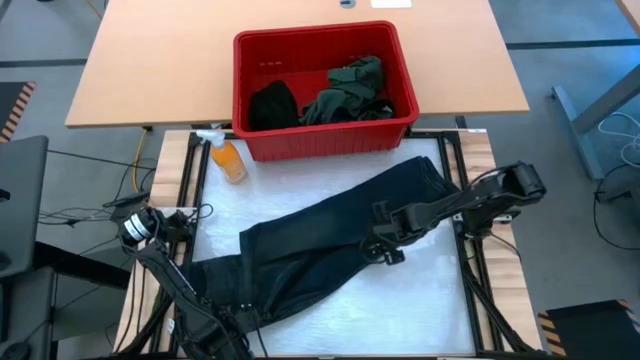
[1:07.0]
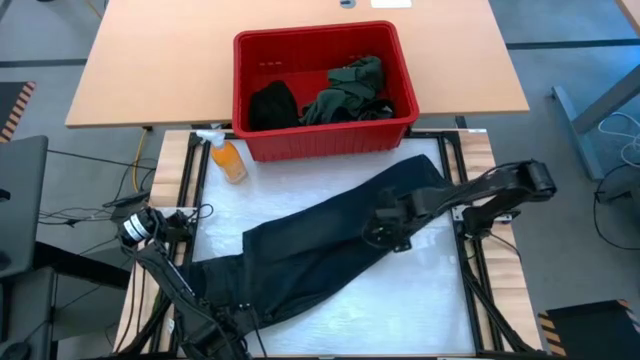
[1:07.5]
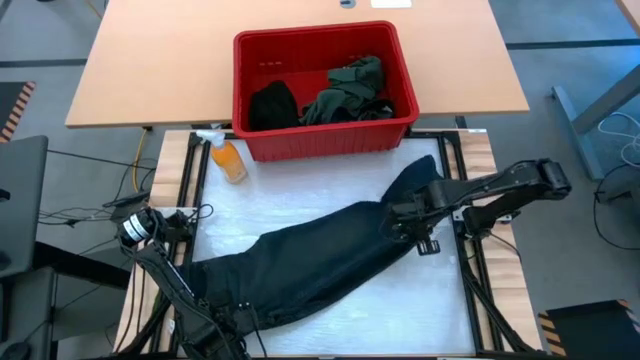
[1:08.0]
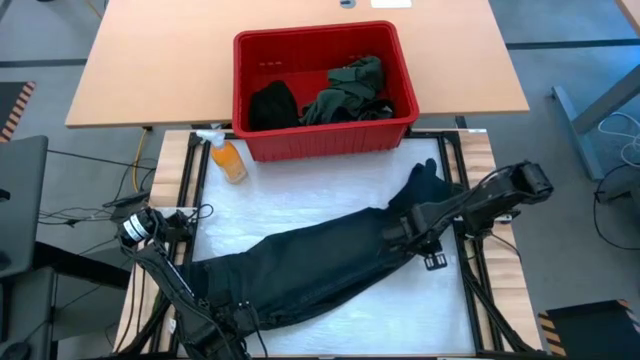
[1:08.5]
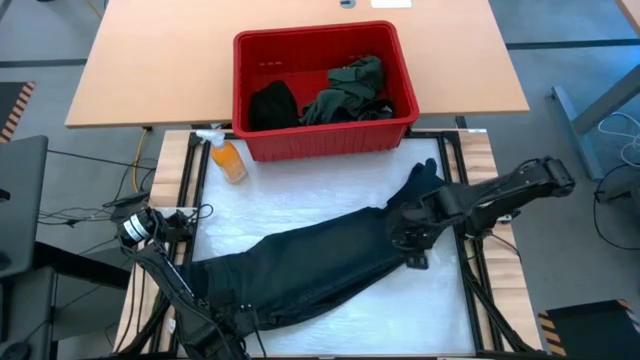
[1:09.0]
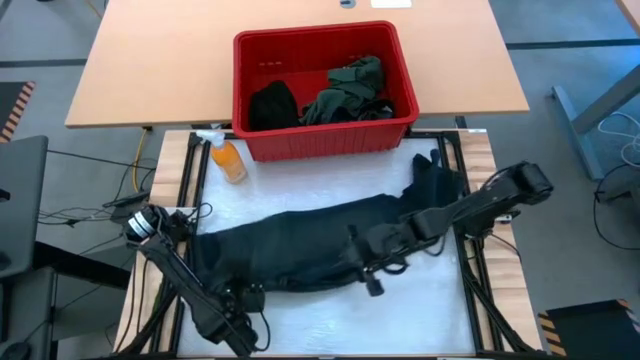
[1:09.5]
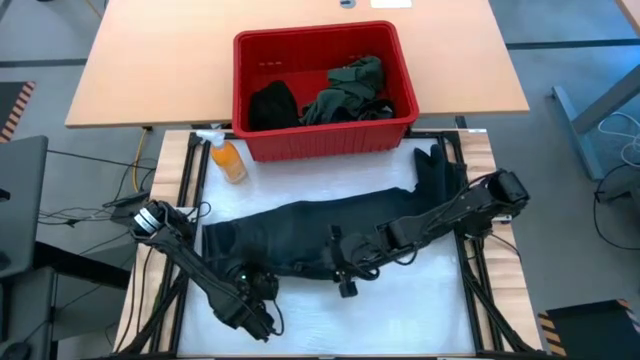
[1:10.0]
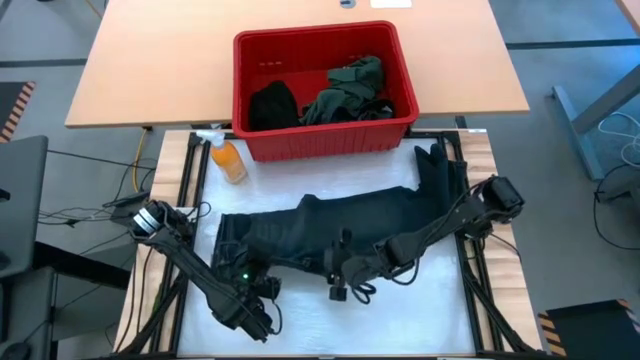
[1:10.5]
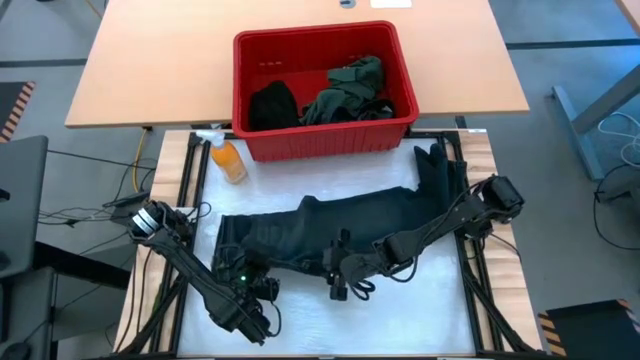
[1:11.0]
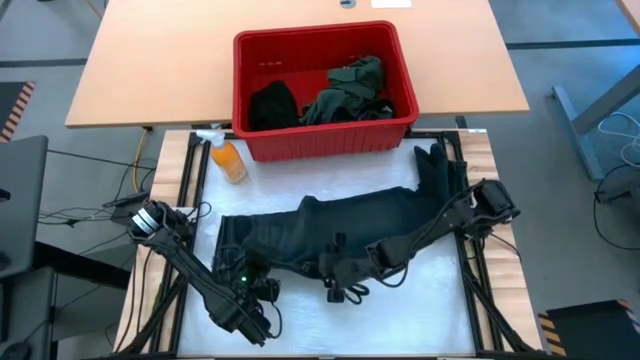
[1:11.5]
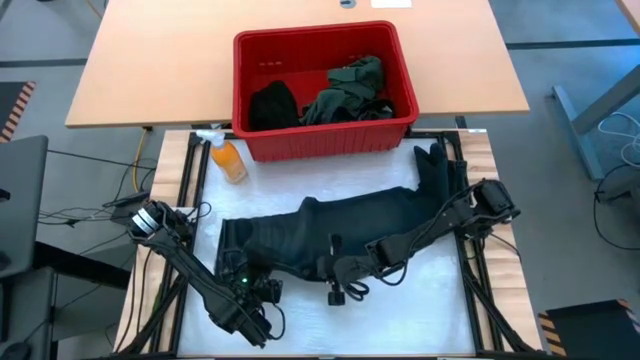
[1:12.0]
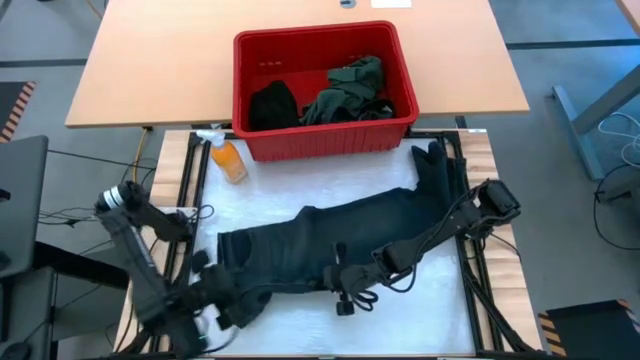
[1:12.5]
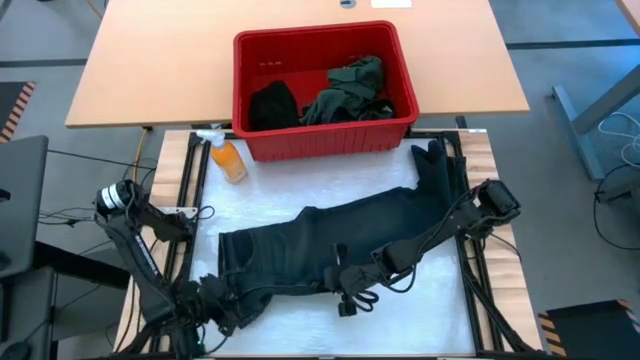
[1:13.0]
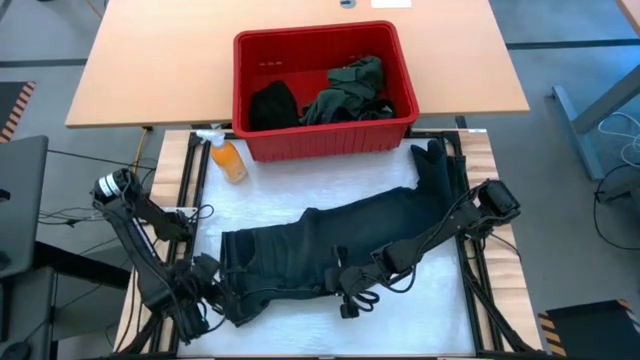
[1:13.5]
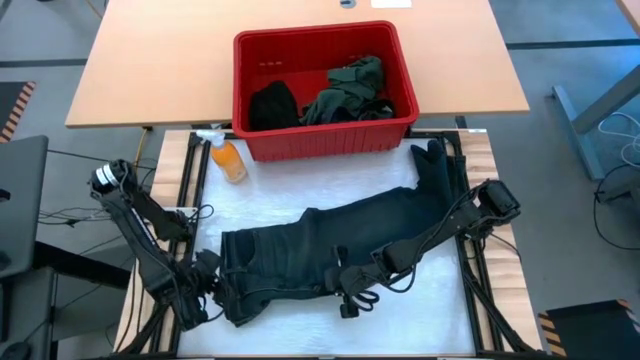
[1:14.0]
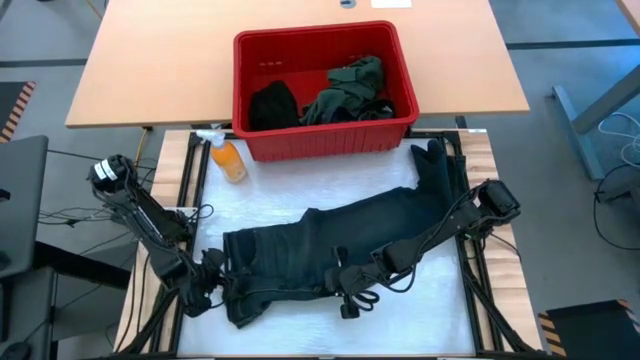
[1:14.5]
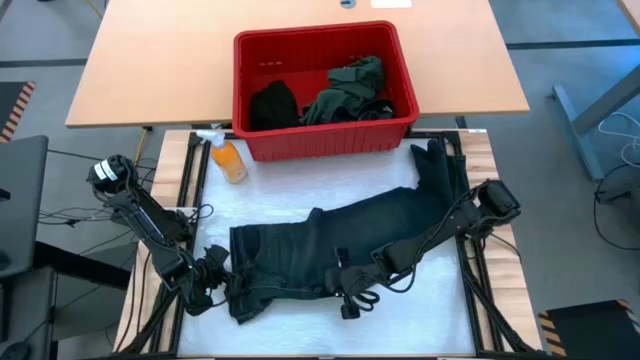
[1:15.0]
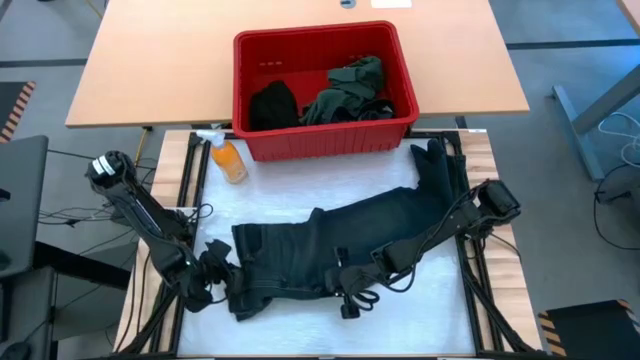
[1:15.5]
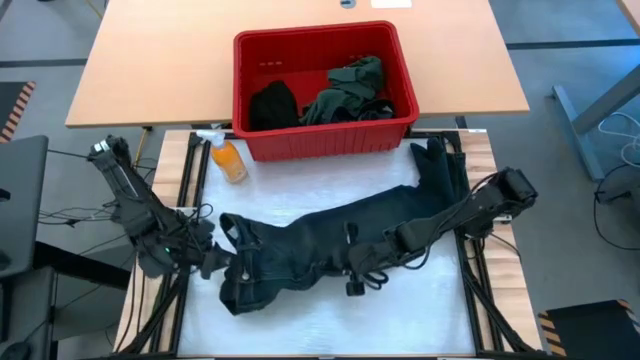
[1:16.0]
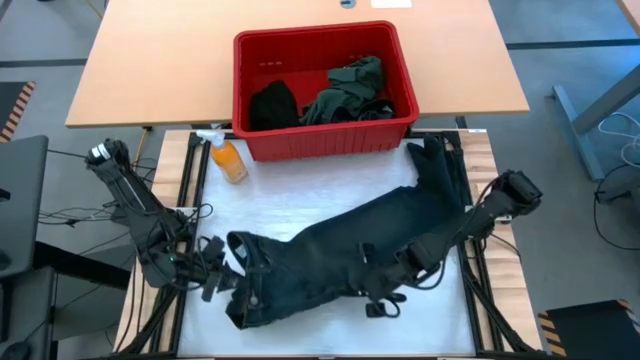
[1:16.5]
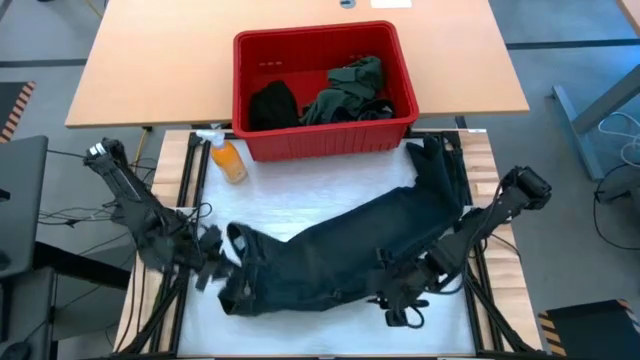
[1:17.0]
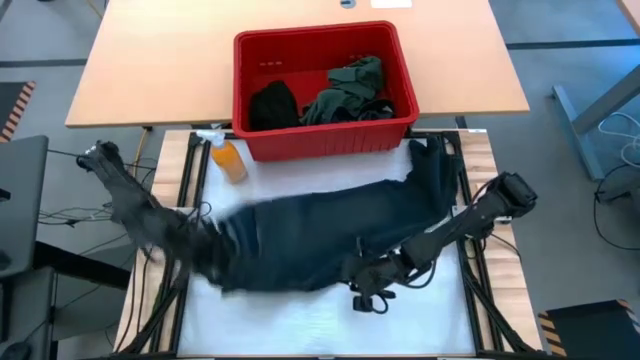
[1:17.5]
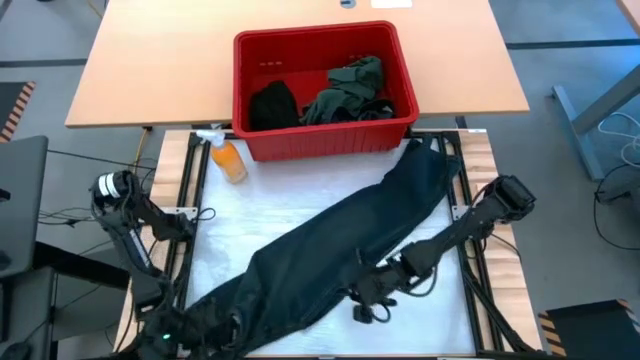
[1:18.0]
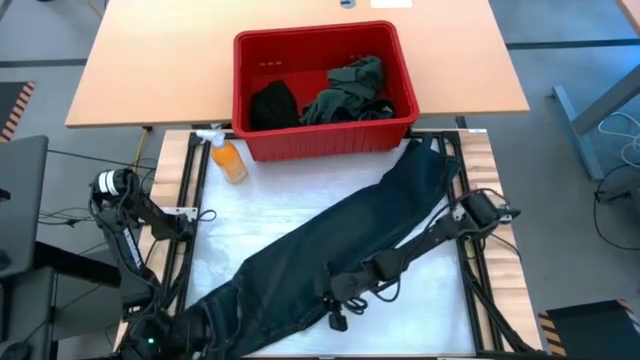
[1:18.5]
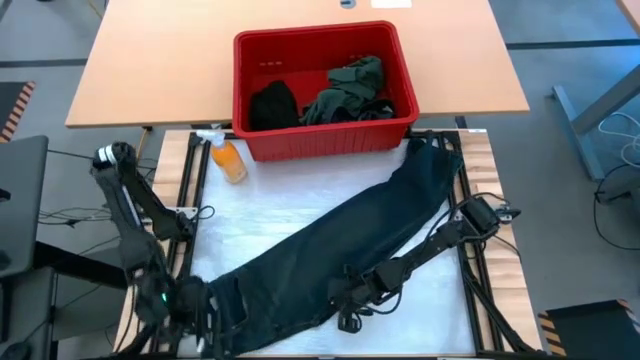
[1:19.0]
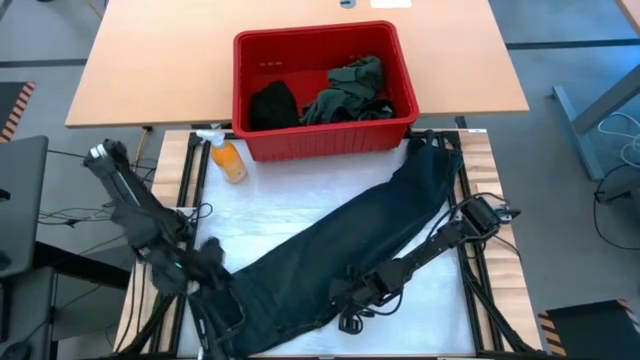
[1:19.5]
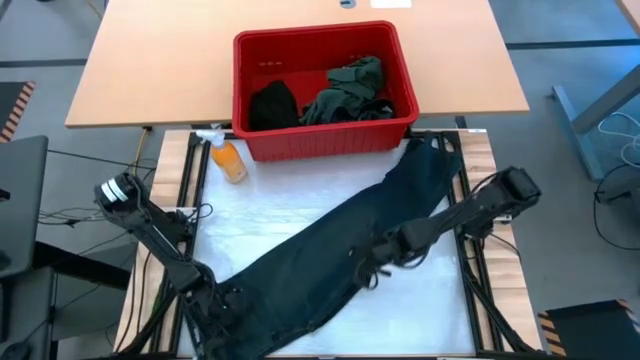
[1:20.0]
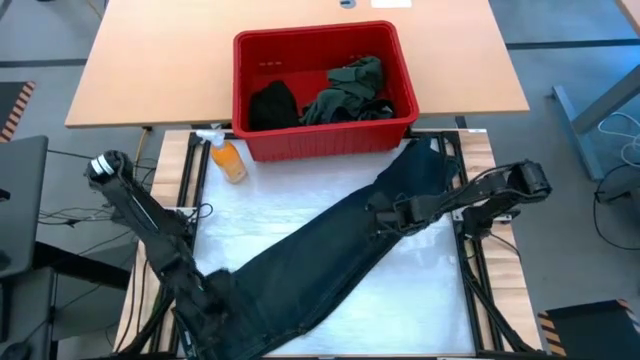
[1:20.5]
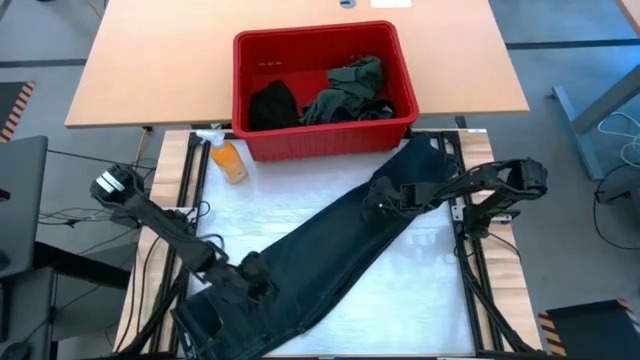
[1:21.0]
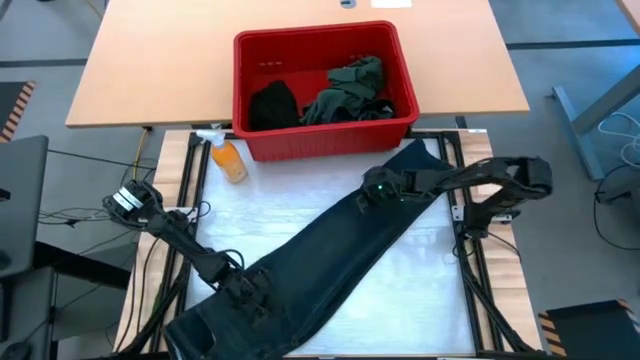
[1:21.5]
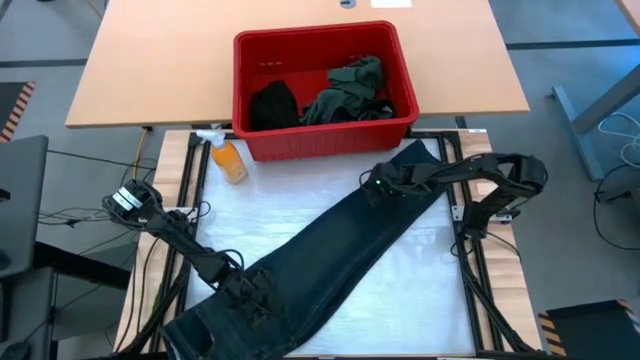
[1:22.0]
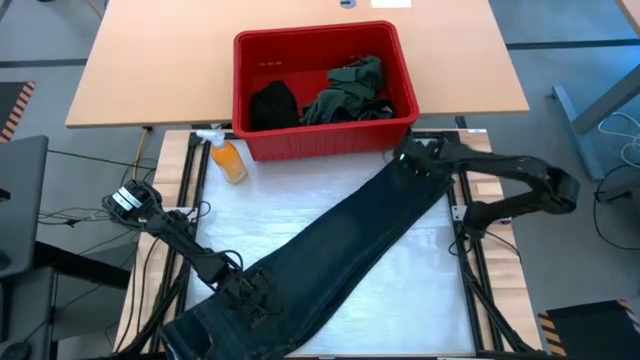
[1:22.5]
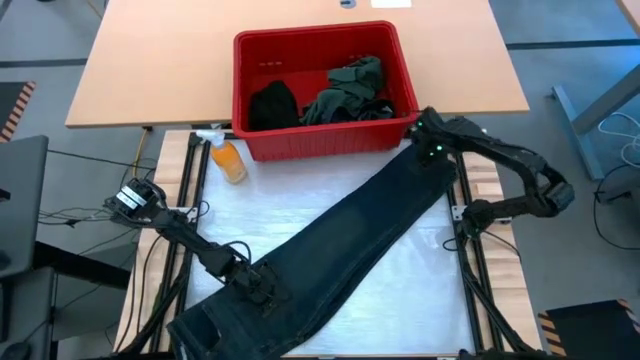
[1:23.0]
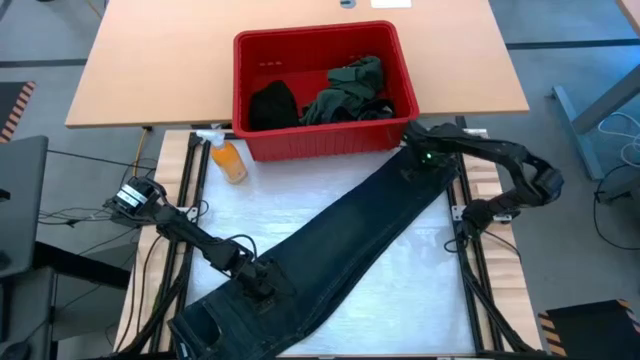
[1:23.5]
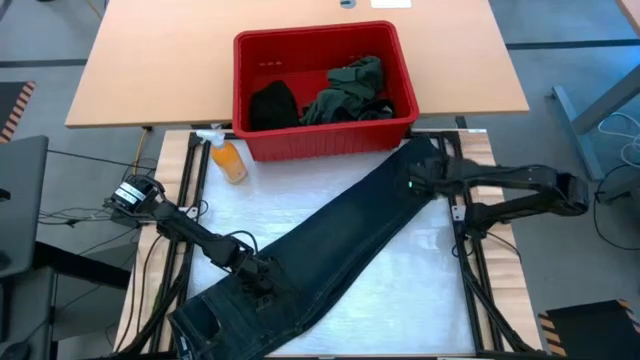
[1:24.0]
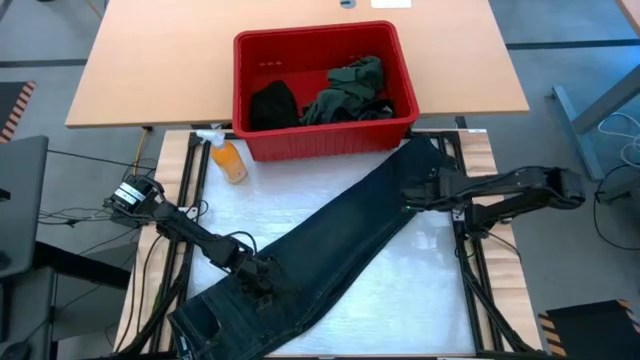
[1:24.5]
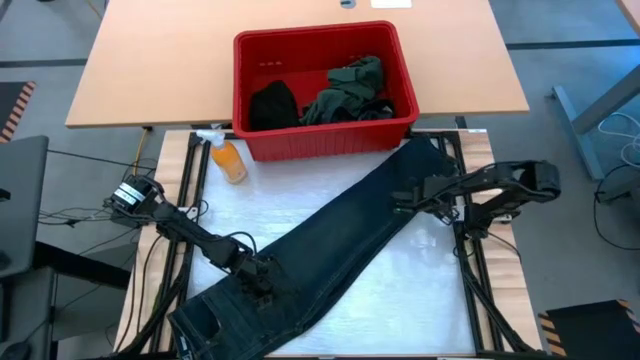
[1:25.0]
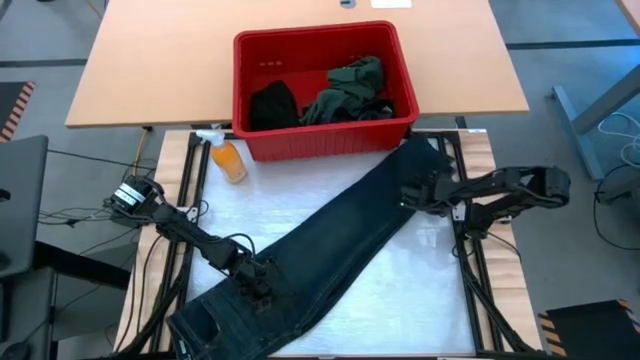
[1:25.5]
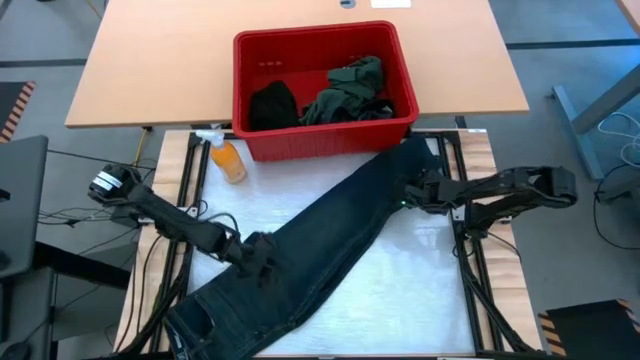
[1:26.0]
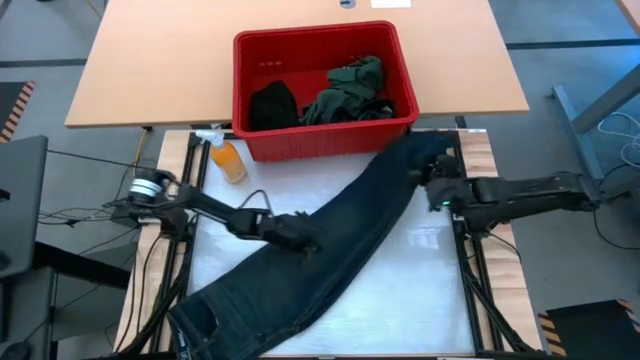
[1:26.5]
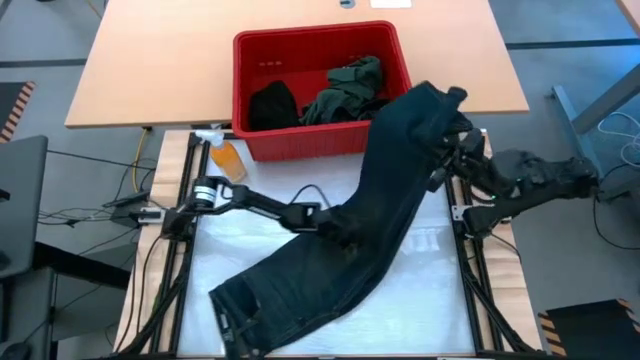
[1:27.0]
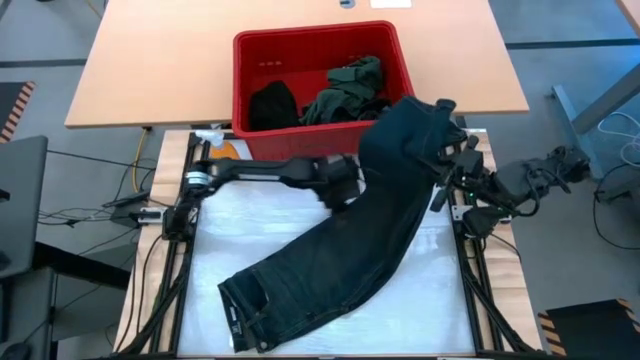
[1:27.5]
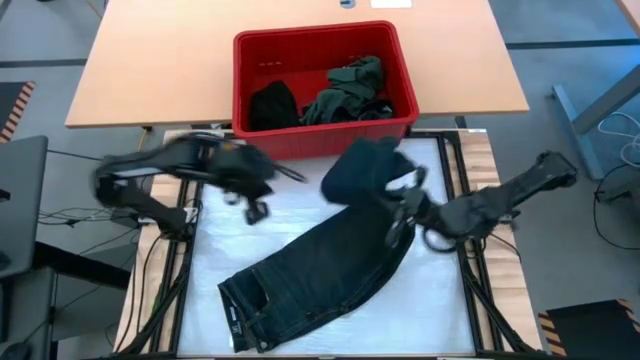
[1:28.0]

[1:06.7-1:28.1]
Task: Fold Laundry from Bin
Fold the dark blue pants

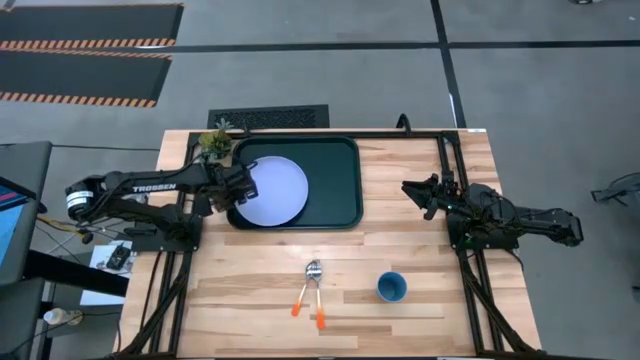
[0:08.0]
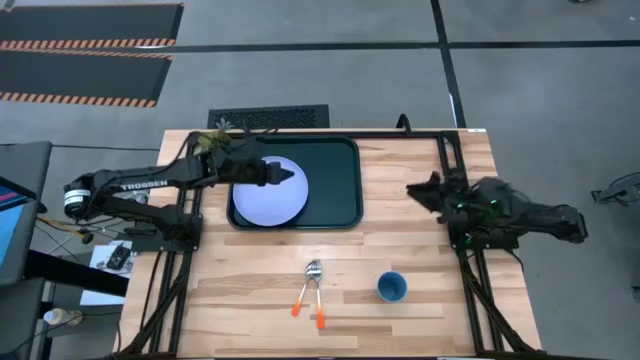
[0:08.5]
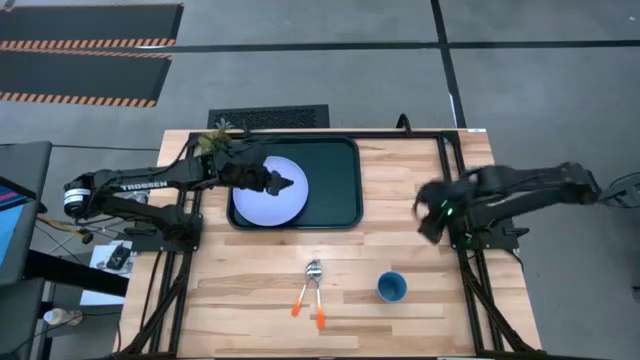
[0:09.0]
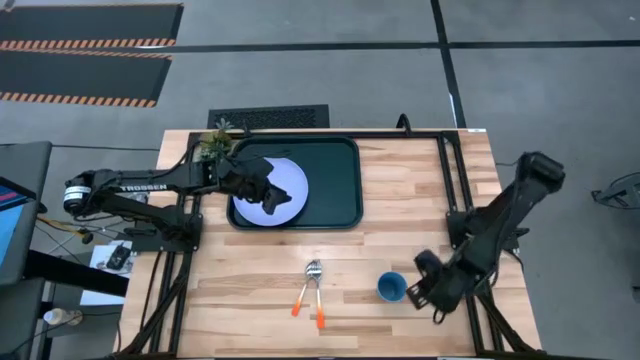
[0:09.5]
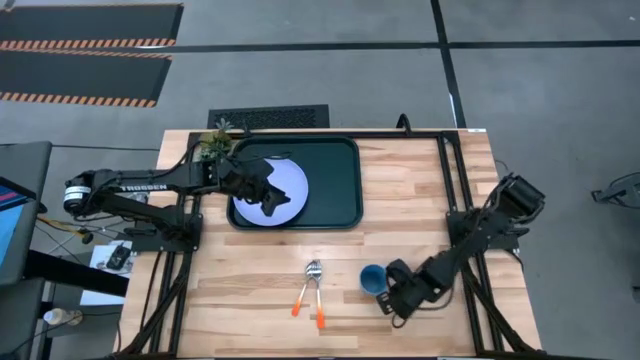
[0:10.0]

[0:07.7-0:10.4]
Task: Pick and place plate/cup/fork/spoon on tray
Place the blue cup on the light blue plate on the dark green tray
